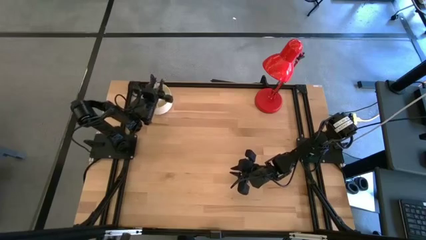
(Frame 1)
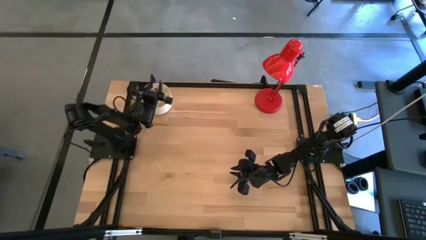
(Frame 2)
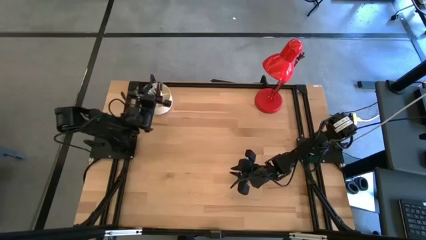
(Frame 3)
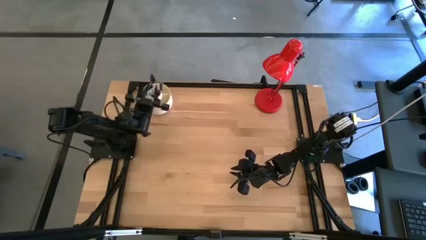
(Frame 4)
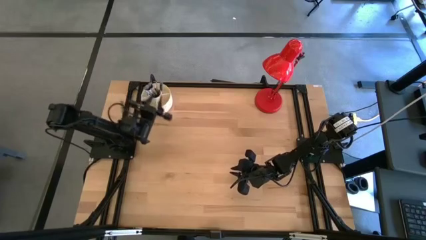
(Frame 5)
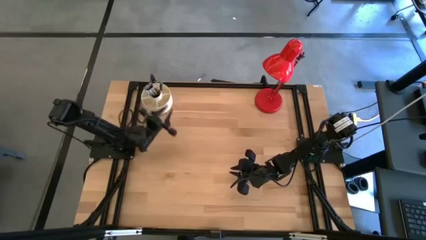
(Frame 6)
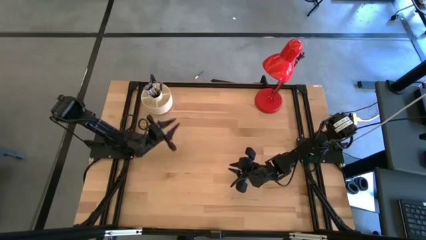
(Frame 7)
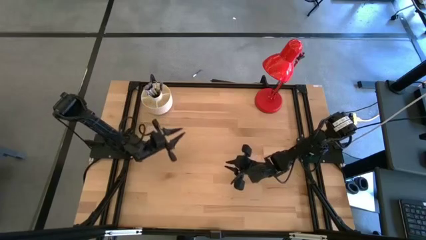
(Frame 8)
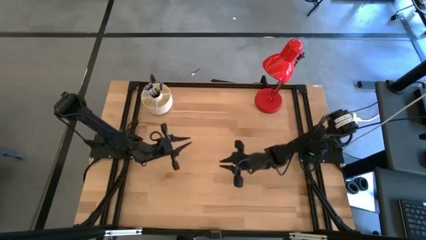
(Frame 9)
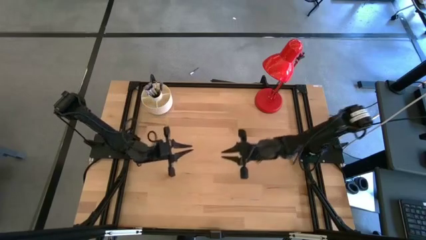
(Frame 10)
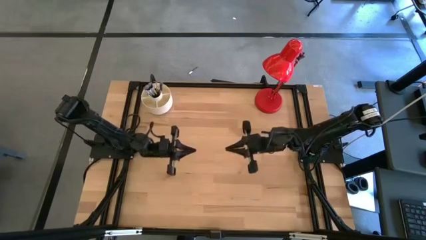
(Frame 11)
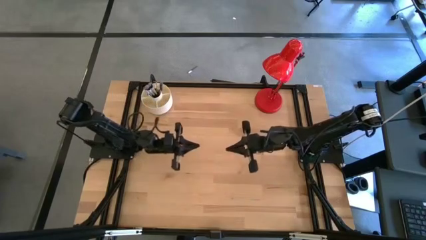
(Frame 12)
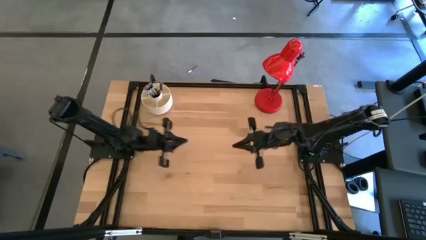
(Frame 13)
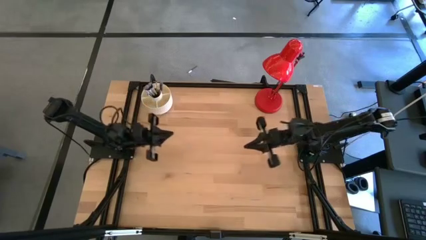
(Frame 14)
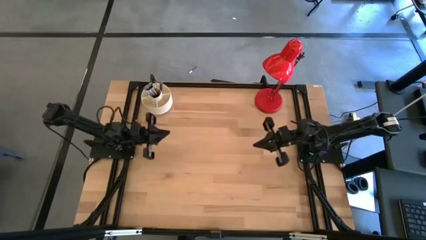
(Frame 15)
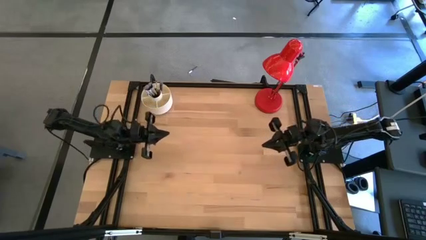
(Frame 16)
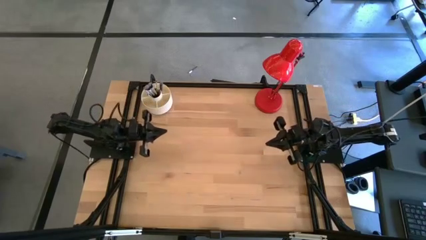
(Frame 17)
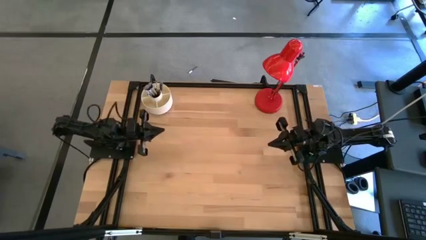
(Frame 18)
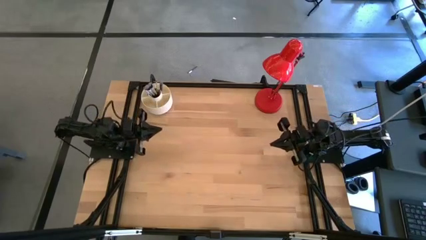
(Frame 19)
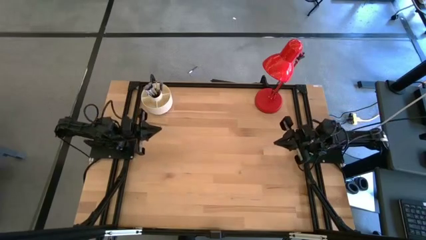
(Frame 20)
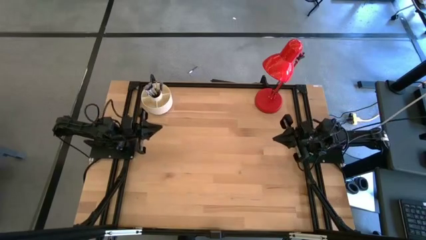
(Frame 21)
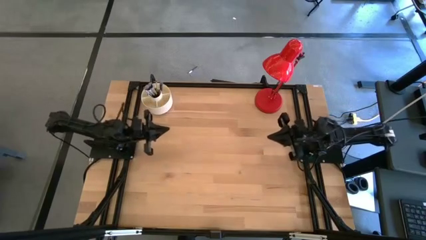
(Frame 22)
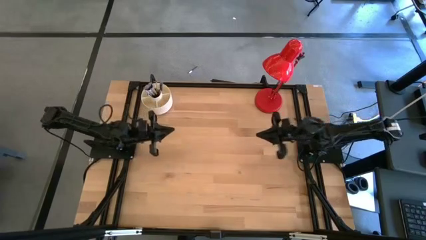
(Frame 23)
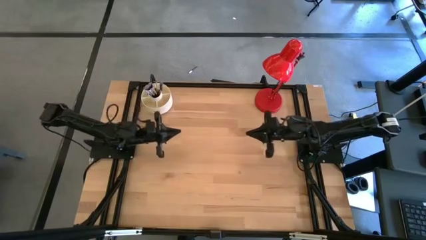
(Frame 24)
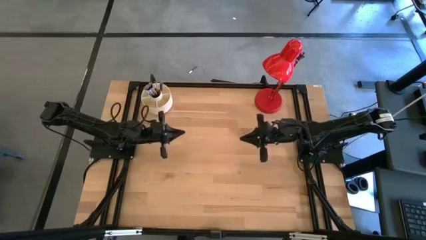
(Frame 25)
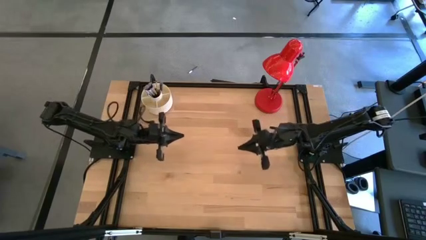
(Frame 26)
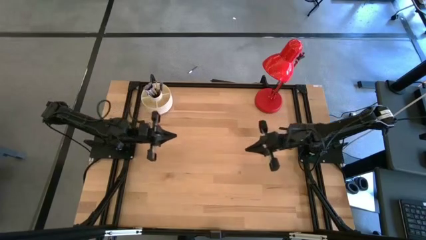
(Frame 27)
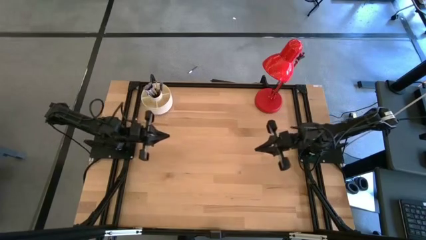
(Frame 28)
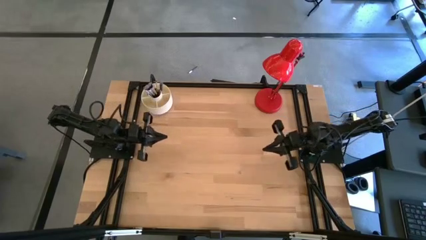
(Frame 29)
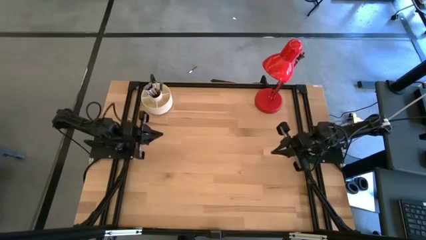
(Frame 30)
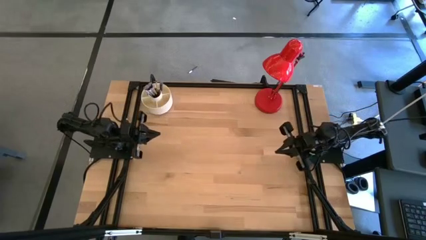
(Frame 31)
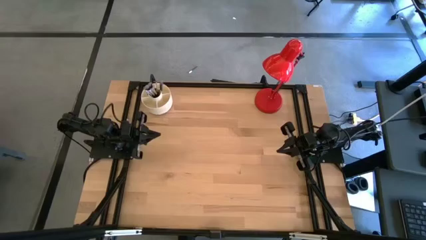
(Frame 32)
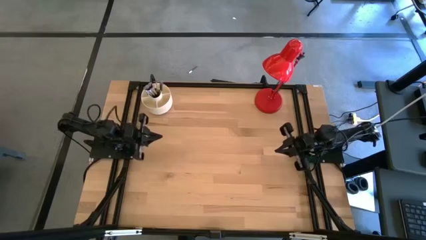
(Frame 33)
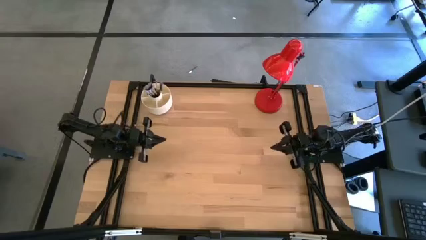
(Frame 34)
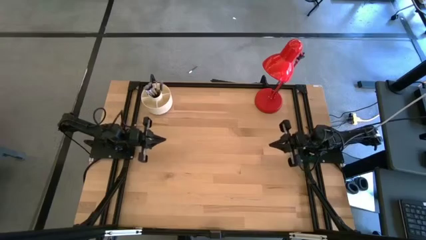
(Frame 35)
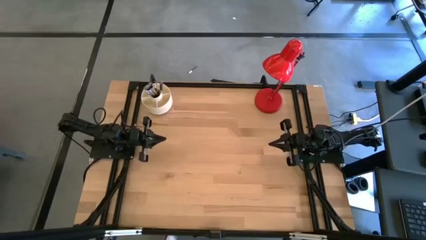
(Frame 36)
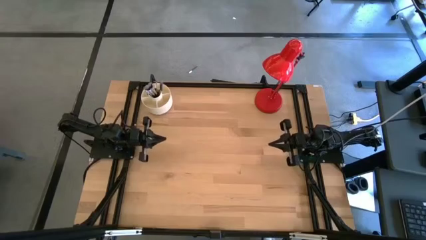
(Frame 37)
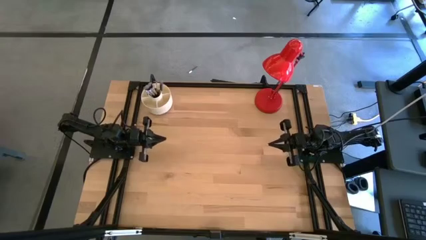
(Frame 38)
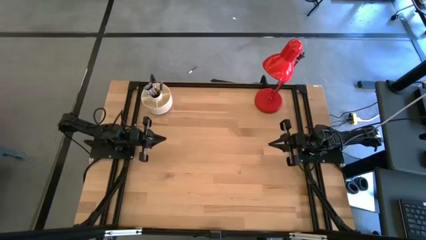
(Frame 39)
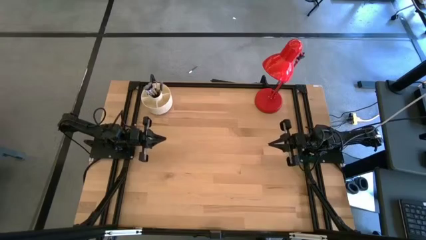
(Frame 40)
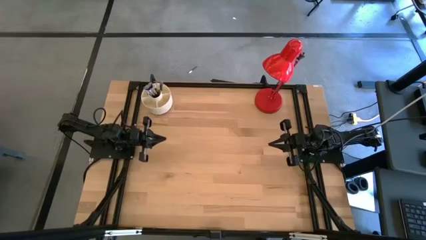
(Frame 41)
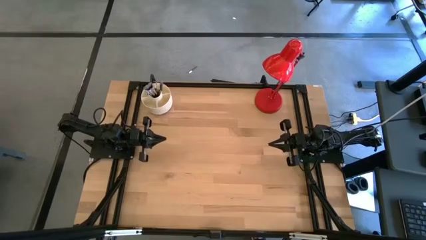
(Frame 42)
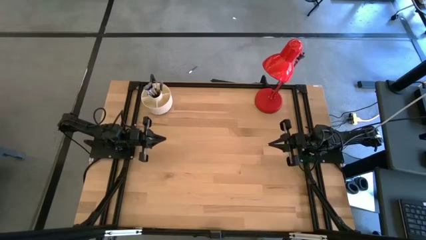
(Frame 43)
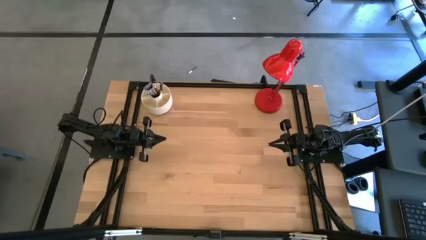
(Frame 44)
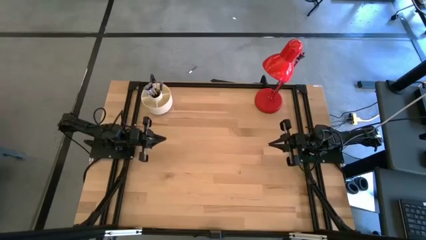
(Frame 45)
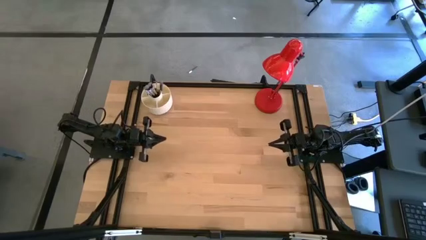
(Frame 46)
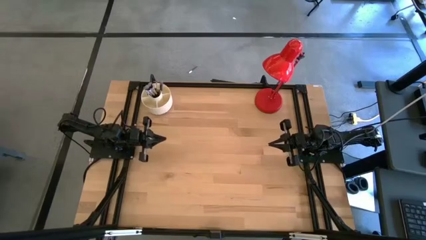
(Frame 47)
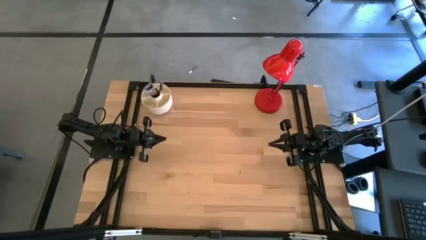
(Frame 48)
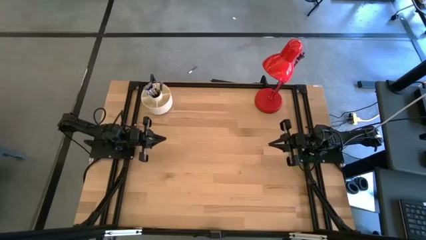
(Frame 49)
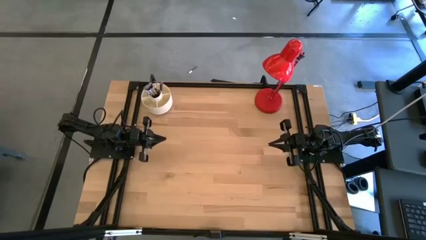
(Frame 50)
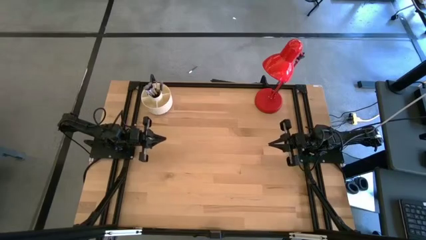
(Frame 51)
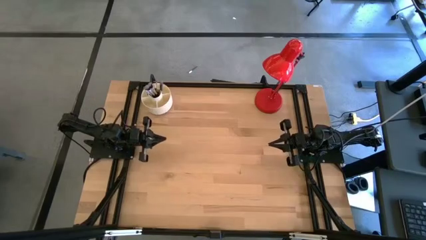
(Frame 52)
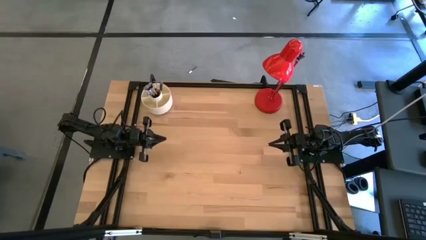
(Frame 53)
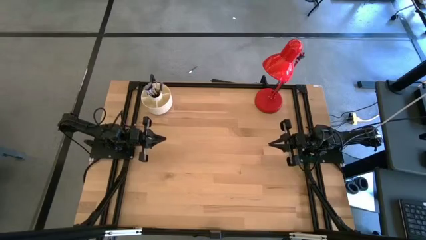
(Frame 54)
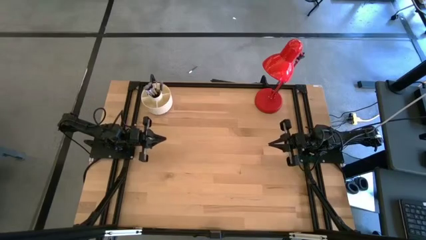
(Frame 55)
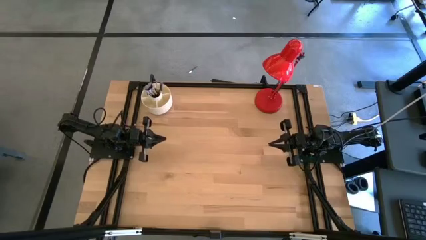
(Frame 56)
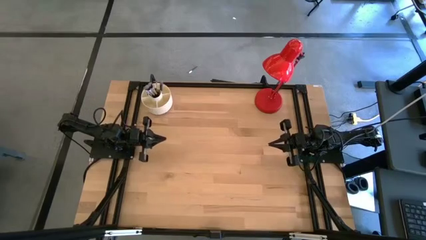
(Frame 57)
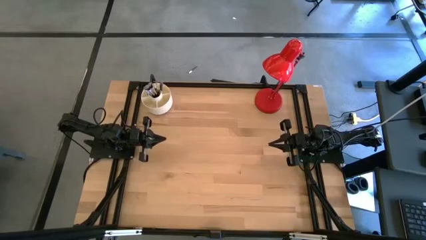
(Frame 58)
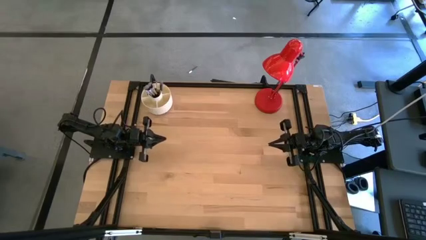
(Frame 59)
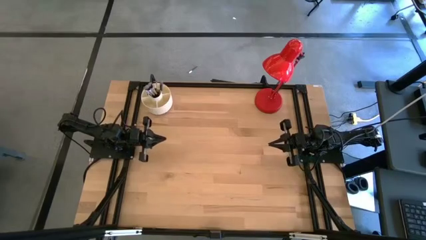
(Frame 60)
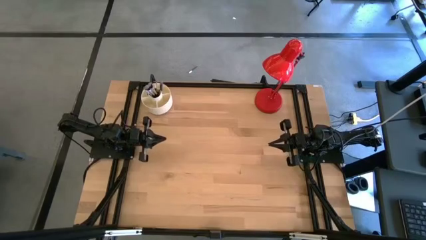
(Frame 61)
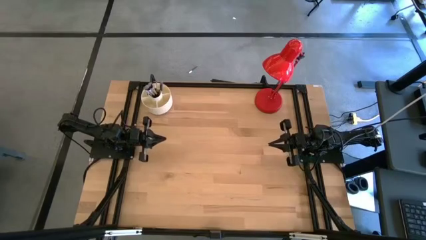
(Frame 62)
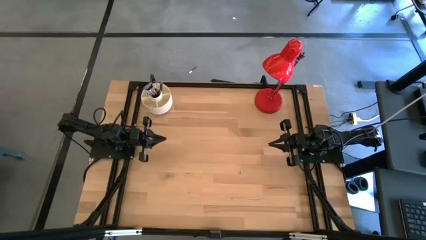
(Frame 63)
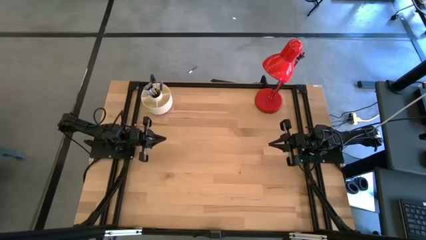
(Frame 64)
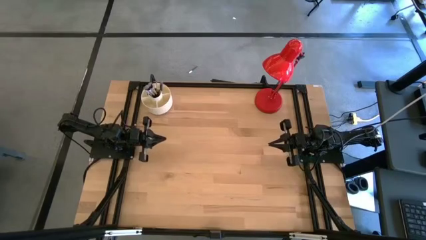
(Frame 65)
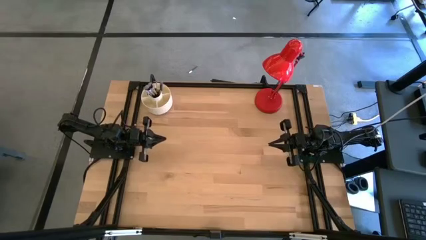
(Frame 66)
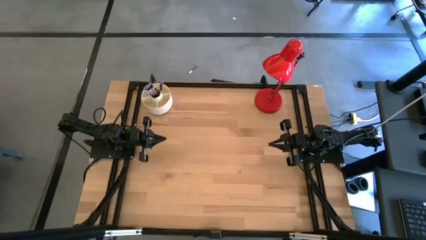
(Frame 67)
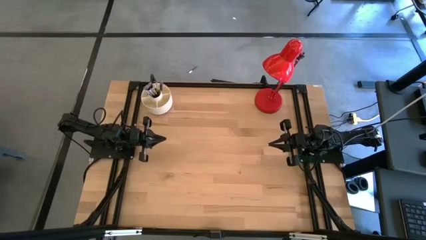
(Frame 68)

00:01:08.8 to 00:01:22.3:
Task: Put items in baskets/containers
Return to Home Position

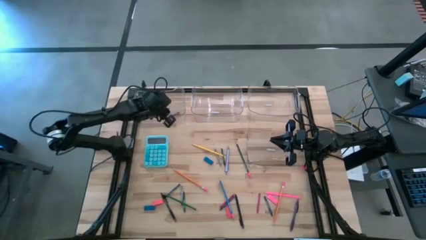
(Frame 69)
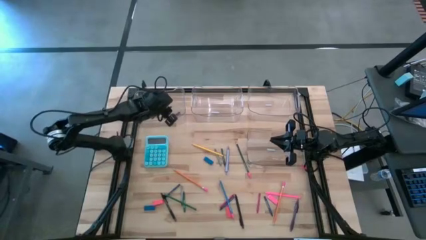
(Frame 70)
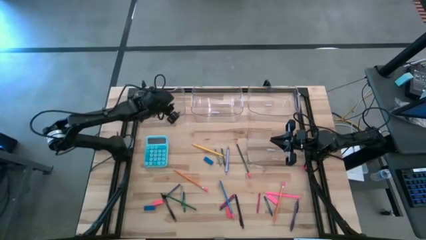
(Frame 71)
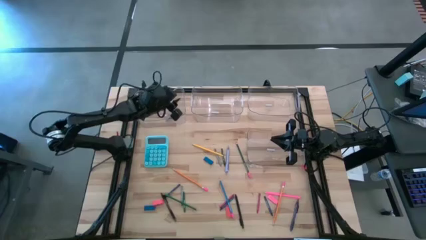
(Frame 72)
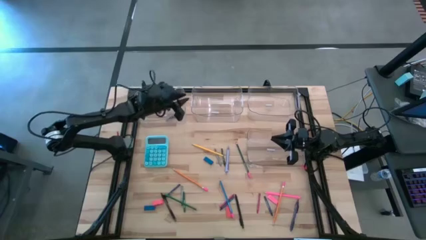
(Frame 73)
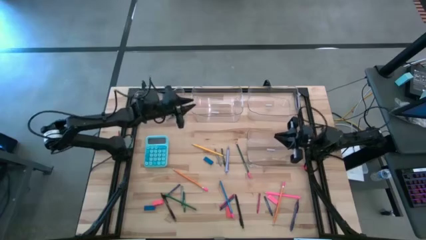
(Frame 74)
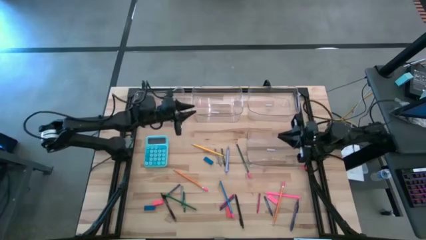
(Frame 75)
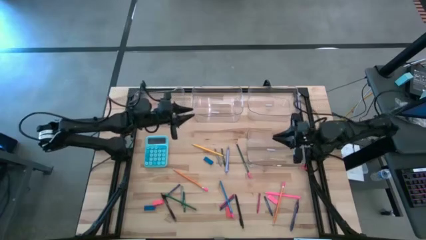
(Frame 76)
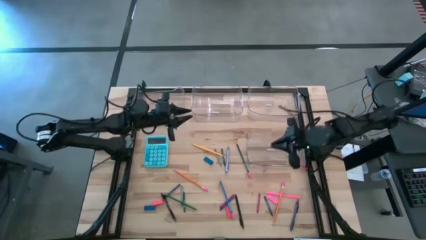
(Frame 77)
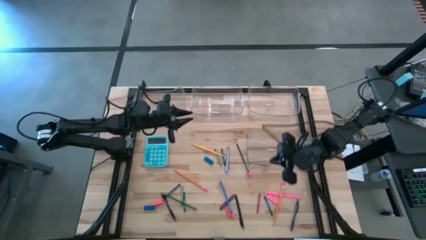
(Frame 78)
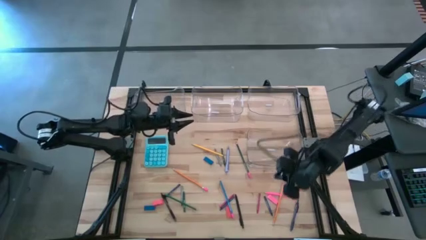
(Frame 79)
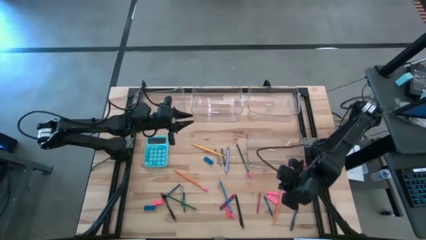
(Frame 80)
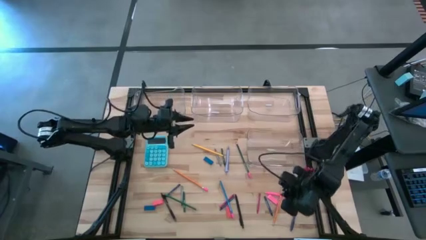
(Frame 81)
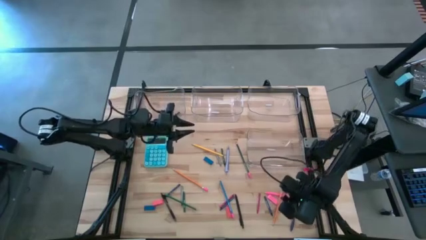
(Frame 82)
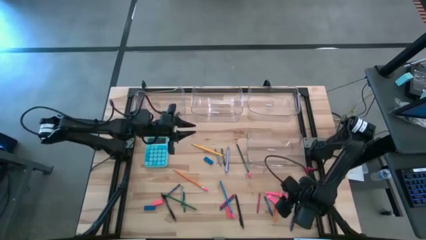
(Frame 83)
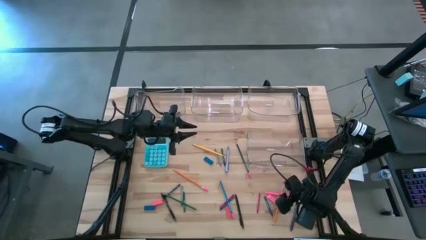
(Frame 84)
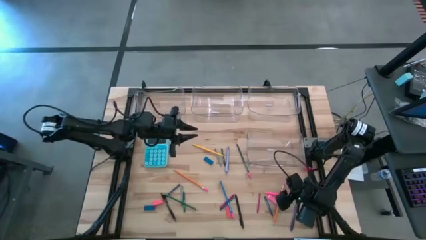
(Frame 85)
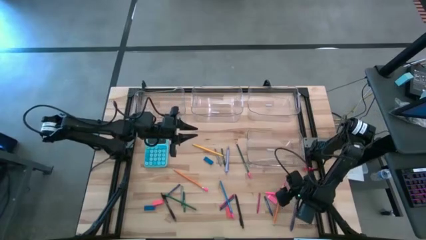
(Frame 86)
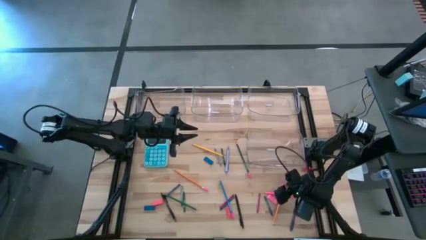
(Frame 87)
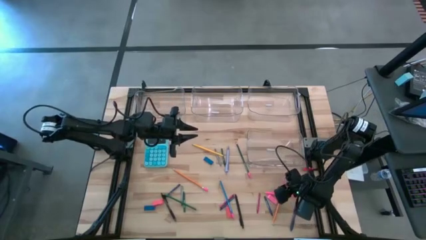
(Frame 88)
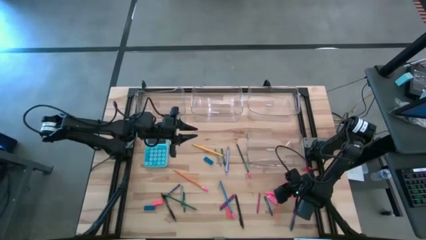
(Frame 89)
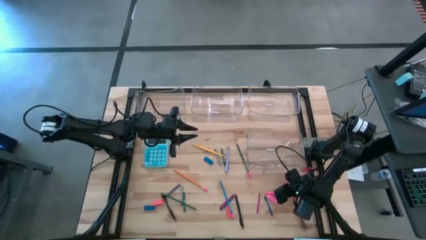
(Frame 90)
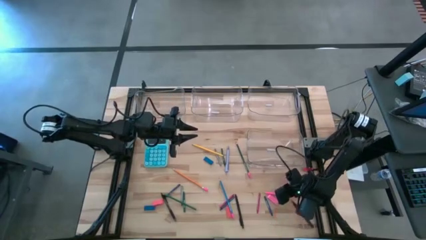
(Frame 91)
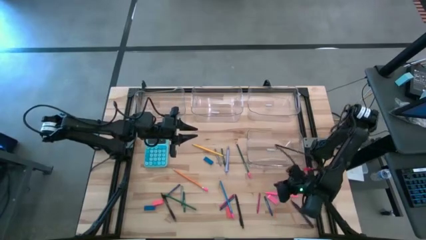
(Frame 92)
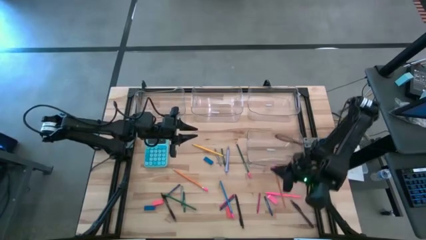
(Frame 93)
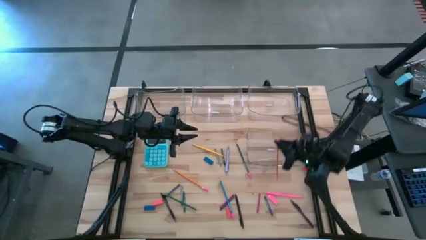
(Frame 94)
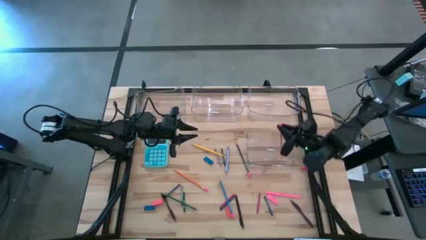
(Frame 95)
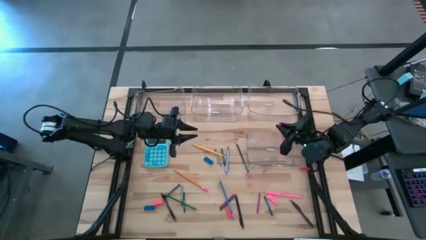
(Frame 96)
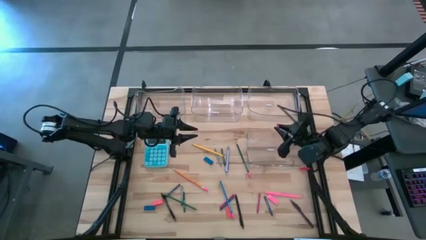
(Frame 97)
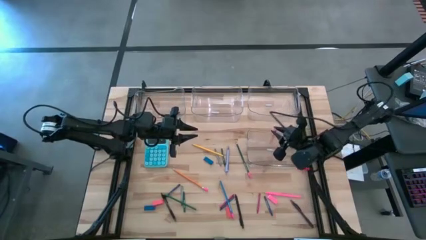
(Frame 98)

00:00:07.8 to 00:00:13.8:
Task: Sort crayons/erasers/pens/pencils in bins
Put the right orange pencil into the bottom transparent bin
